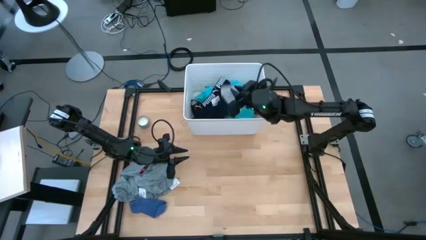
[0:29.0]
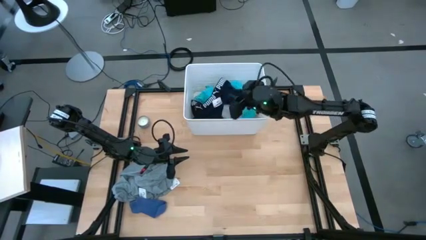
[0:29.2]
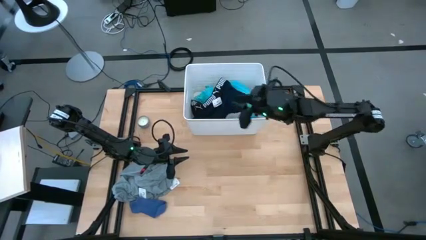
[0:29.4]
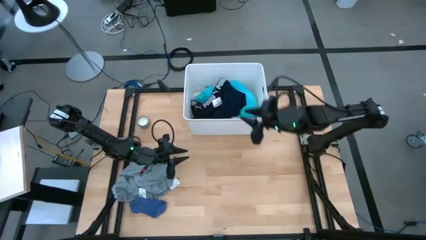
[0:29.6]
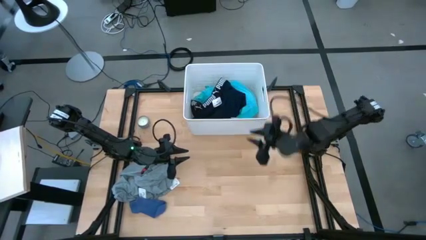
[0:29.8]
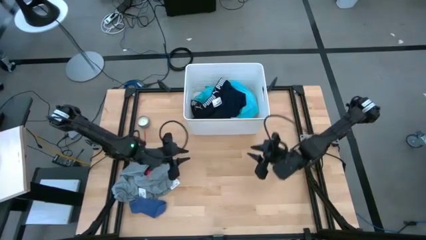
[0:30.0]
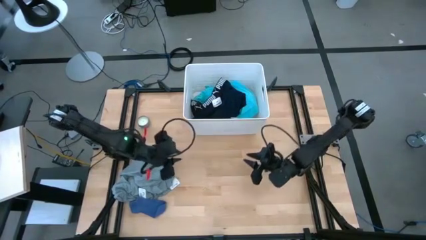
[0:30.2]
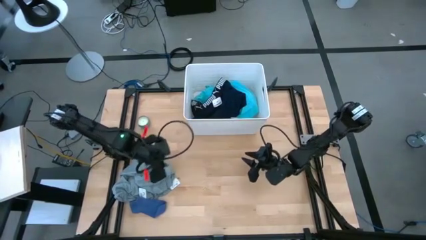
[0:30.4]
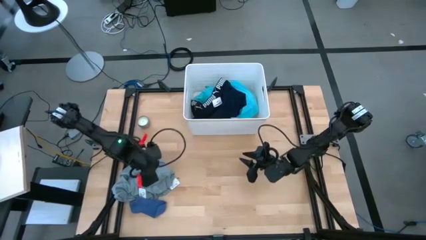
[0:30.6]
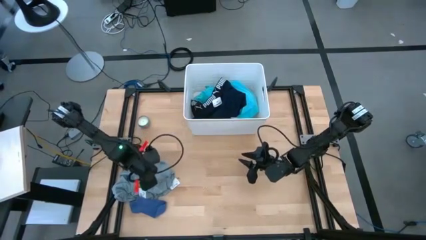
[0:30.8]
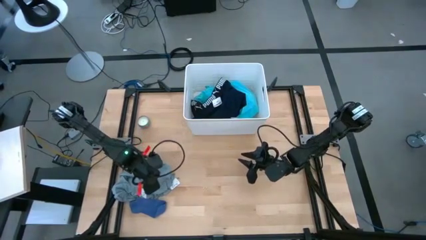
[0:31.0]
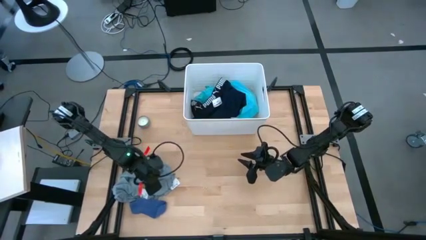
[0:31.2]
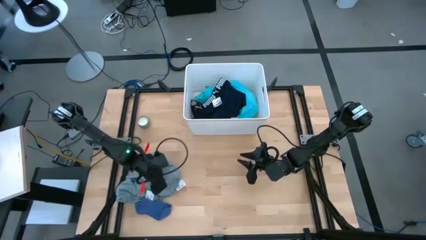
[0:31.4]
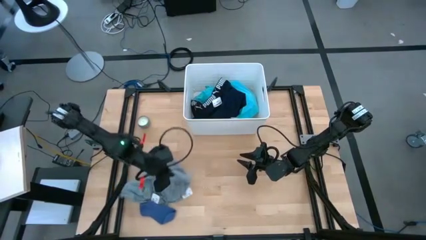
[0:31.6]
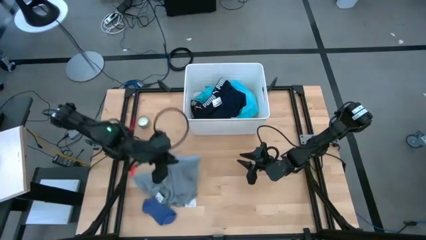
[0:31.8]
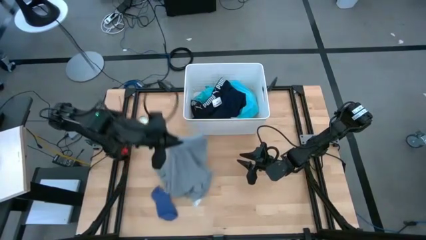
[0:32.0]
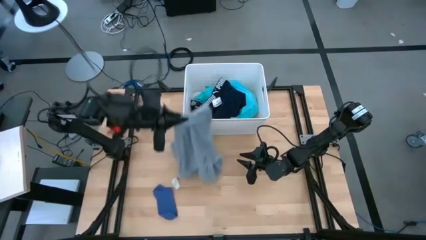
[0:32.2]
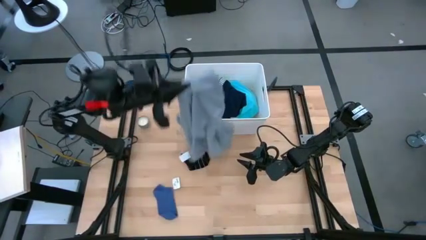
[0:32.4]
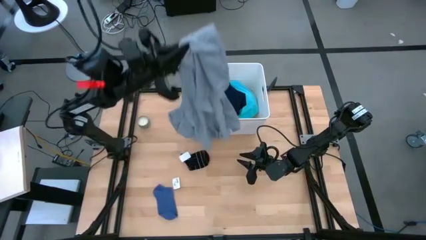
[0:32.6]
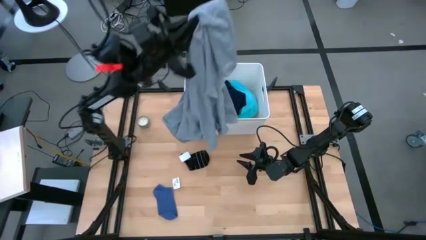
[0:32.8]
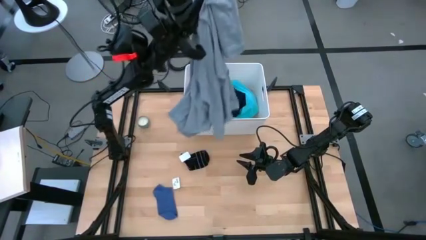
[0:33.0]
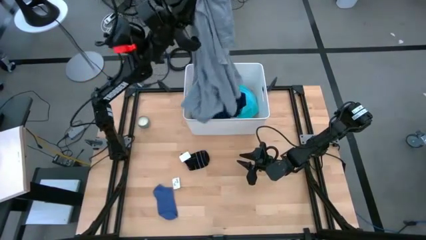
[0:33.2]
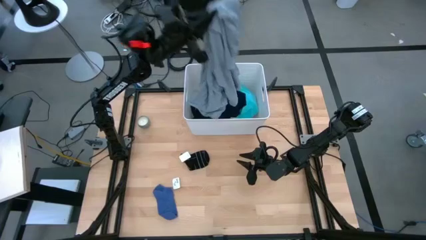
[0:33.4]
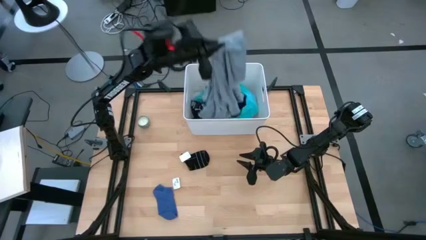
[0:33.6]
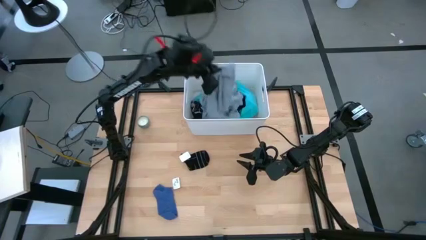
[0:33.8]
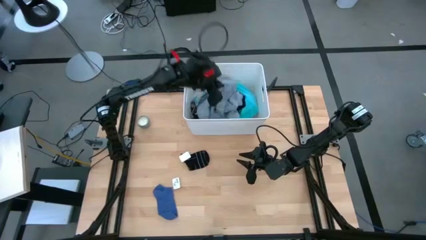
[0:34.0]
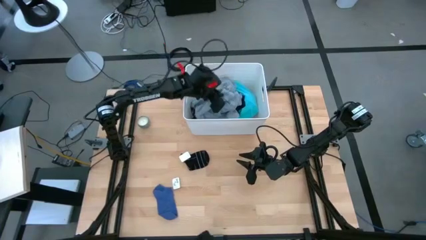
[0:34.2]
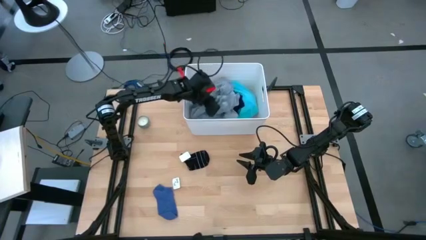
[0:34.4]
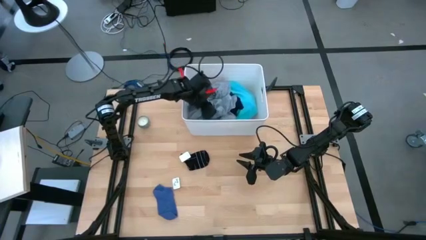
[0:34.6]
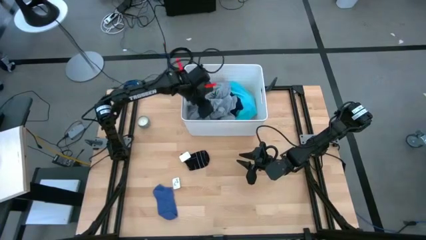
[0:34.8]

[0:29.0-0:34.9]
Task: Sort clothes
Put the gray shirt into the white laundry bin

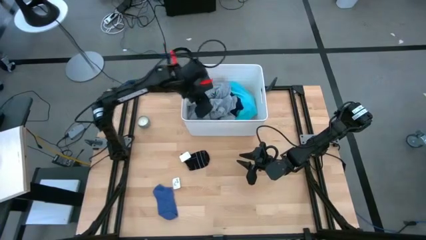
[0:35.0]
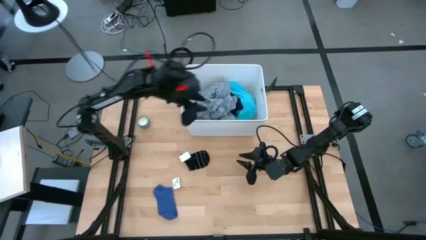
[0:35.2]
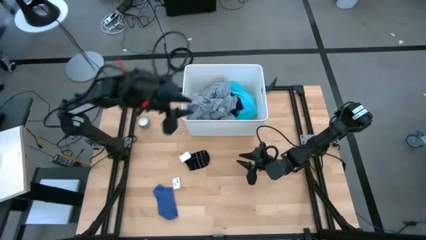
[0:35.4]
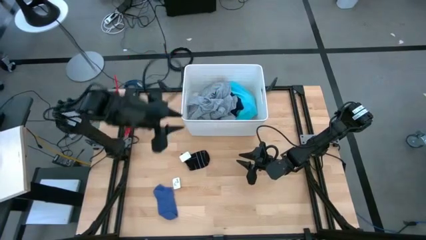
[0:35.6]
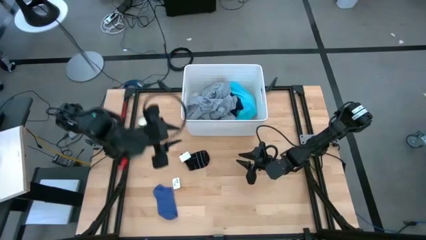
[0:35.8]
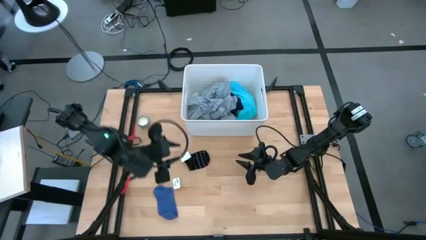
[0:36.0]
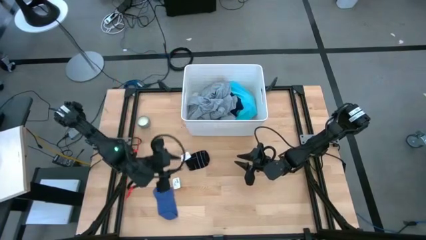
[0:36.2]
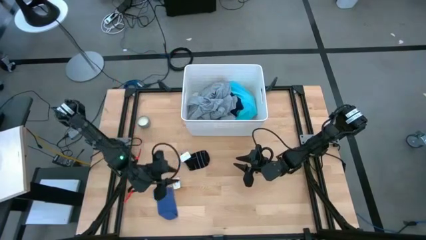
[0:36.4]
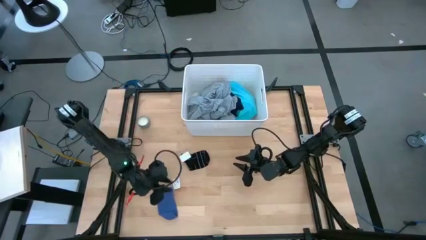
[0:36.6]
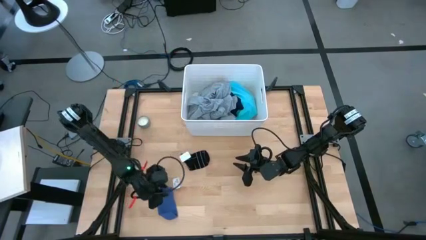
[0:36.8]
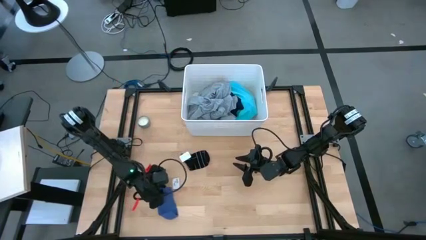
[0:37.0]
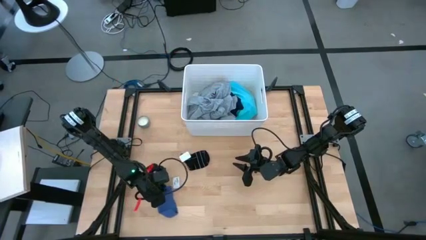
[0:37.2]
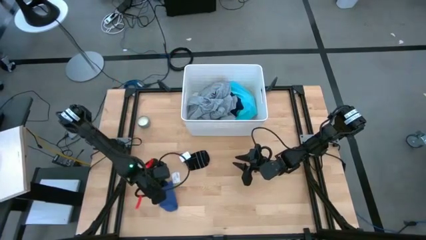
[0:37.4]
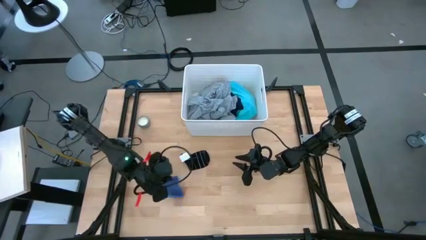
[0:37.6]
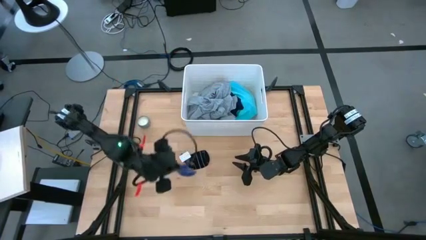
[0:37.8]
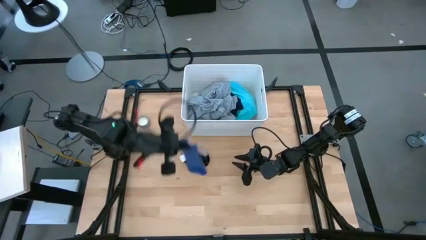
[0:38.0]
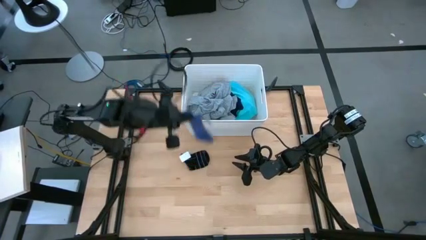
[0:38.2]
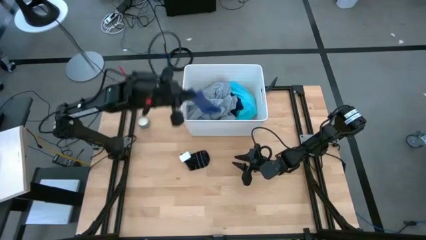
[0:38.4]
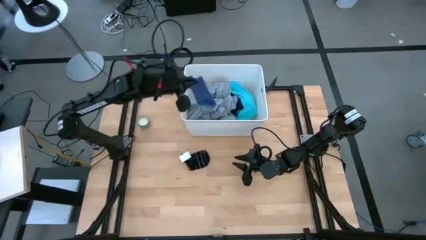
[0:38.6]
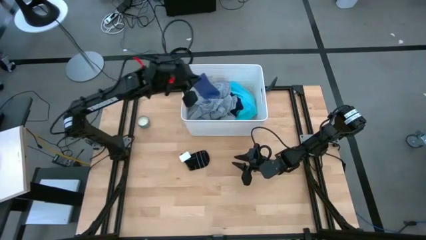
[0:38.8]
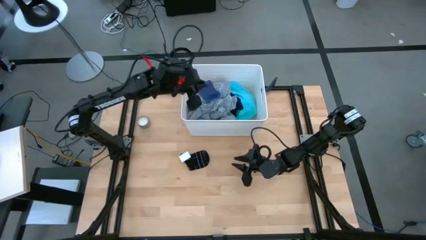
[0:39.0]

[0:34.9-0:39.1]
Put the blue sock into the white laundry bin

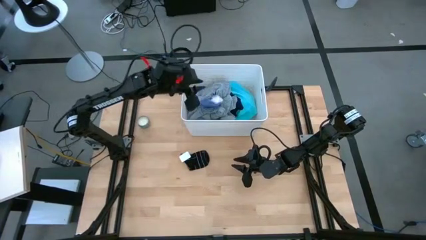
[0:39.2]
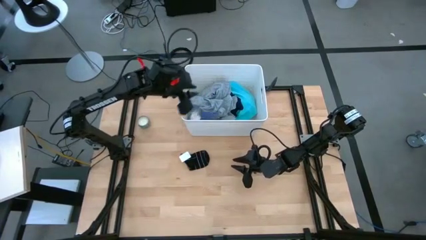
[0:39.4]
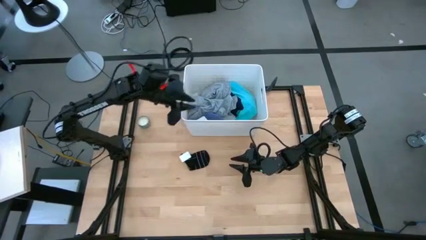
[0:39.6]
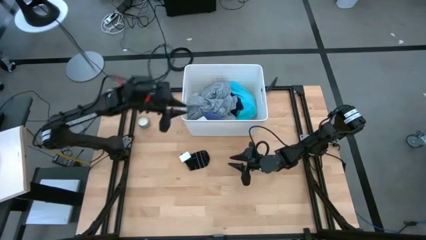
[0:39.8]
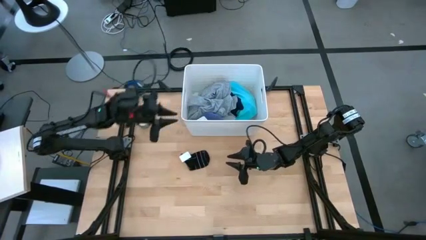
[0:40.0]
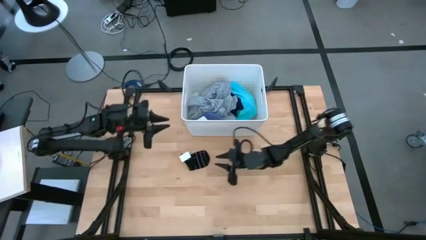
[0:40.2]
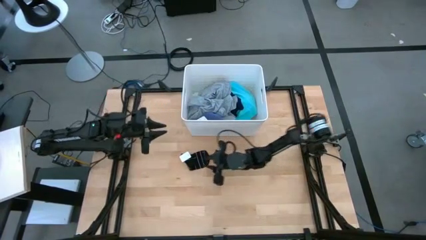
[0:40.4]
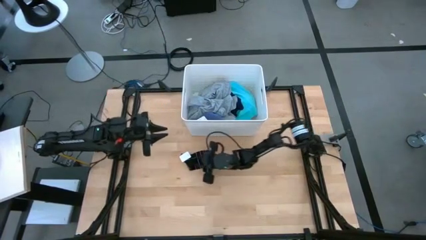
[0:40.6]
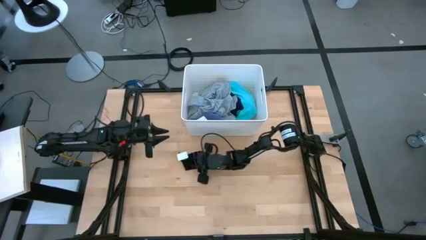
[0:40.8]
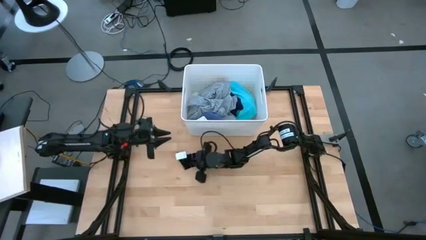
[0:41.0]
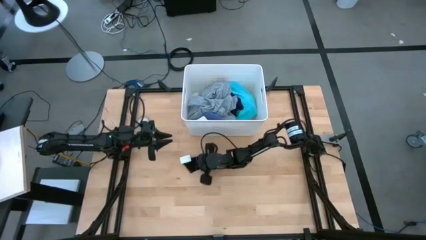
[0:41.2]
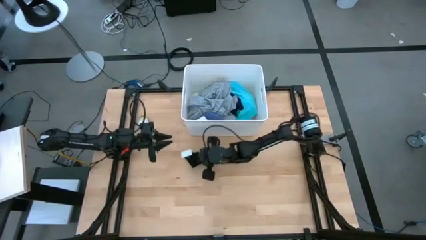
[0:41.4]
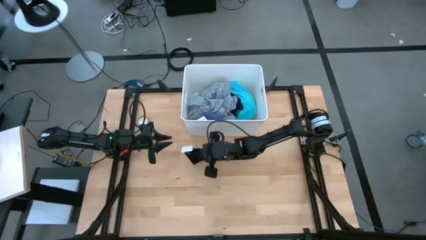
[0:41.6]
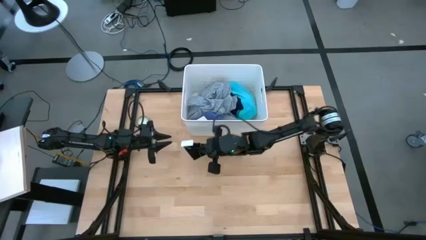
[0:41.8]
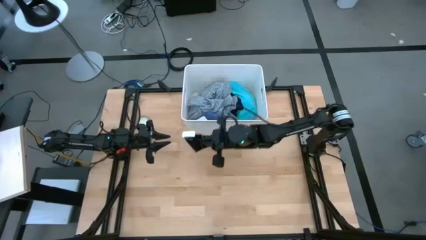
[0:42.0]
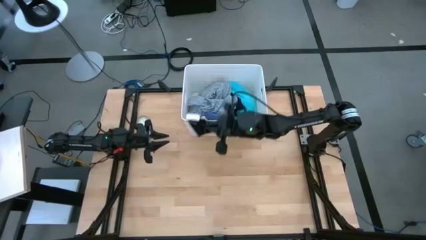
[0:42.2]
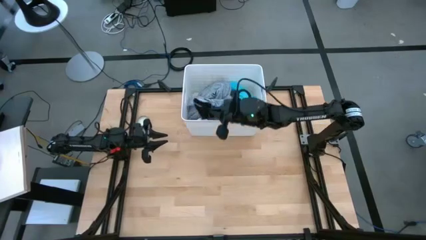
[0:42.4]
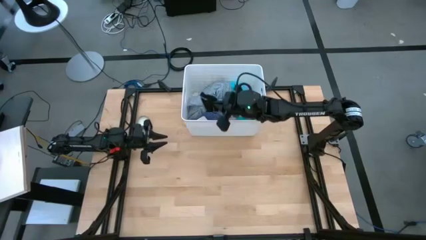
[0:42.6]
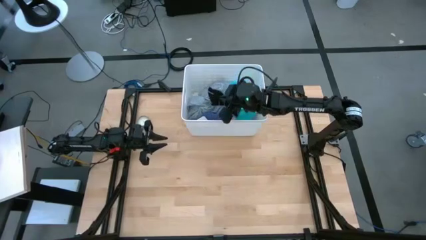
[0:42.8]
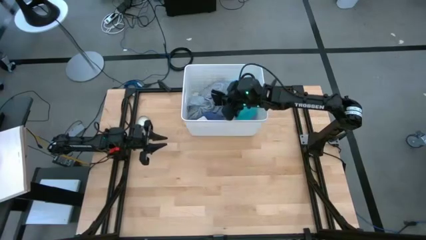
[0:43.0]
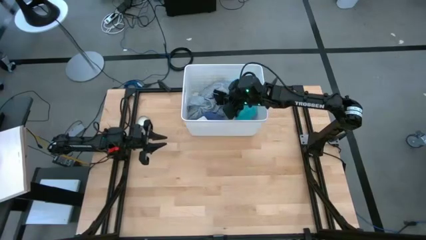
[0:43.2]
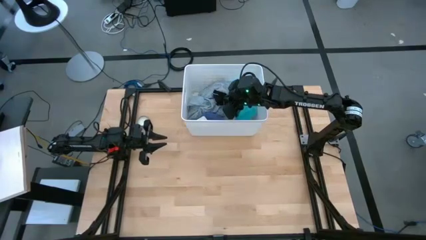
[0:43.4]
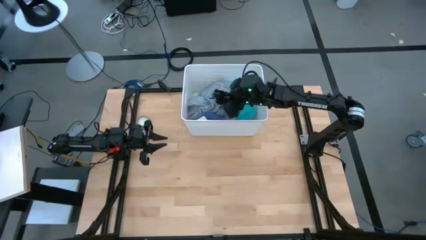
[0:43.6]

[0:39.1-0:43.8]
Put the black sock into the white laundry bin

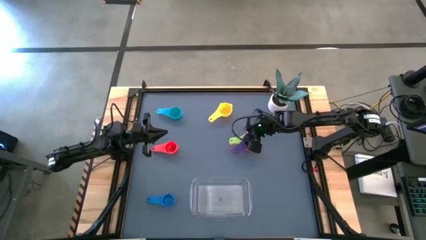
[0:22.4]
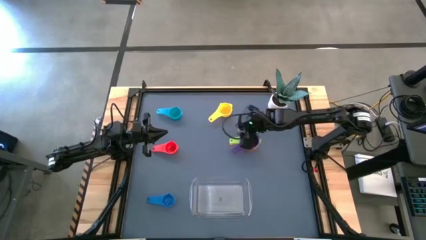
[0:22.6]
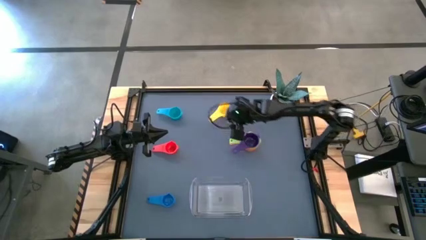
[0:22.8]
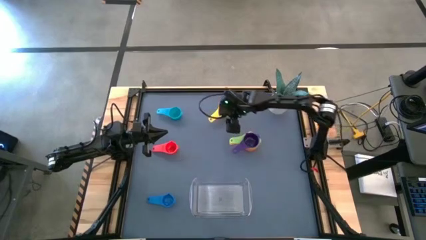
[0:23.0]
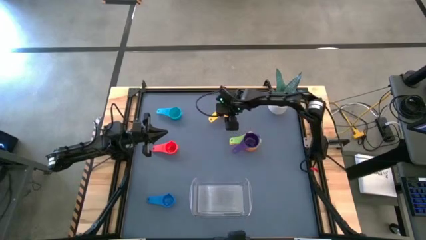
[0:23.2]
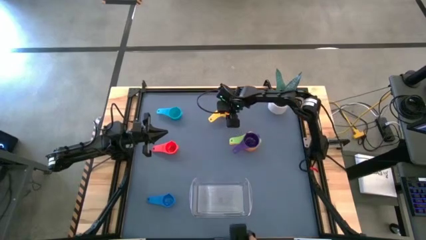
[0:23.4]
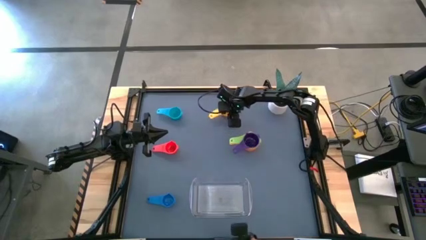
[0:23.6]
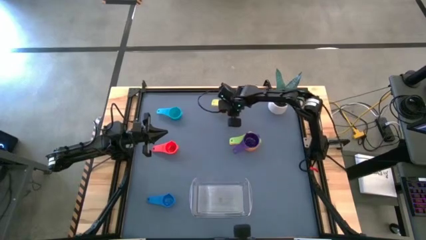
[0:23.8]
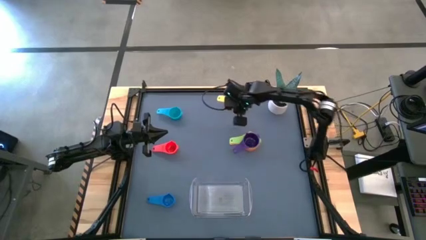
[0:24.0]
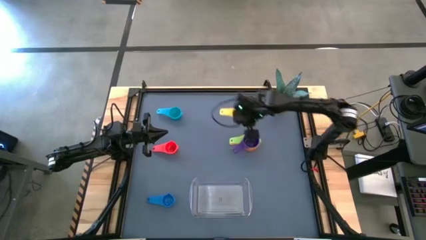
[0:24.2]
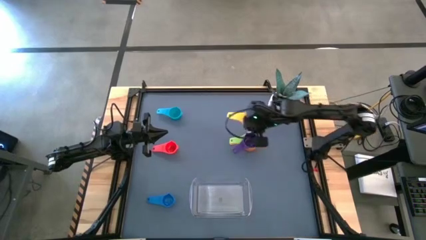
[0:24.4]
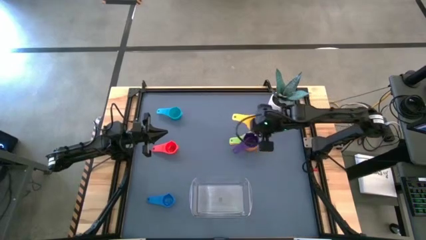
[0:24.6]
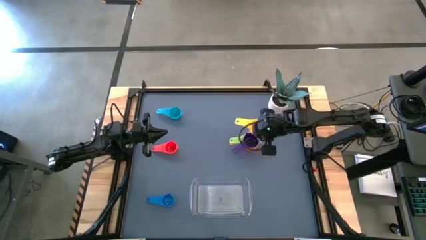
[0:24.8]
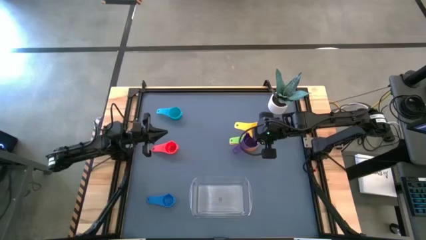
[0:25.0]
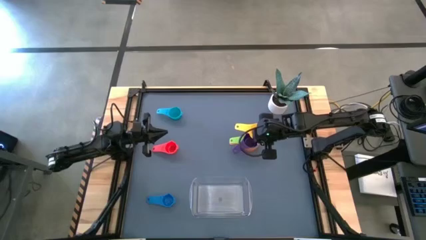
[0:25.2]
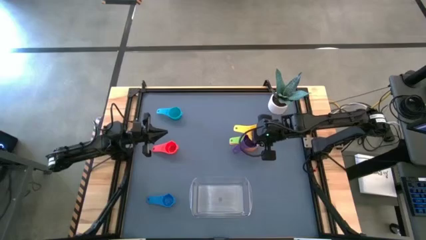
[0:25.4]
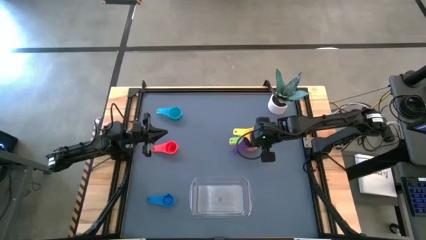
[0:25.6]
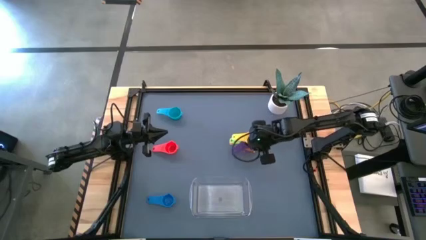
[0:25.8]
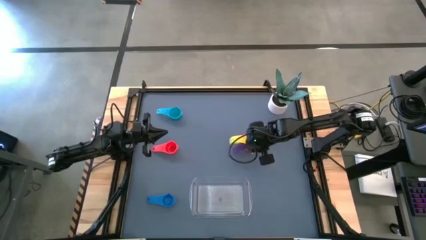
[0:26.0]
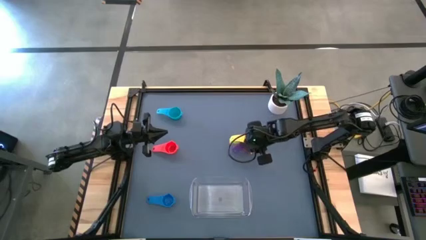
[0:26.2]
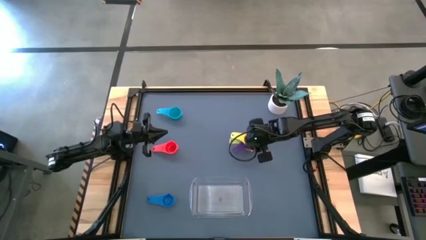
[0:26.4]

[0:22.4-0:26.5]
Task: Nest measuring cups in basket
Stack the yellow measuring cup on top of the violet measuring cup
